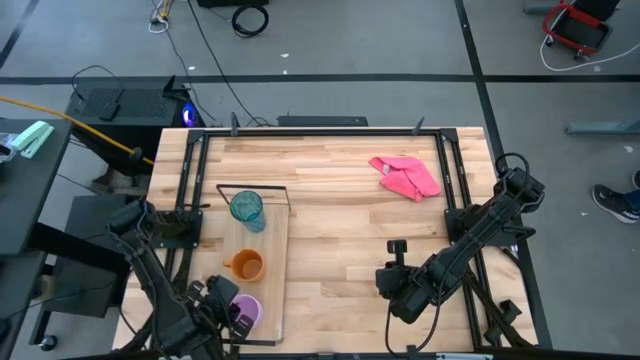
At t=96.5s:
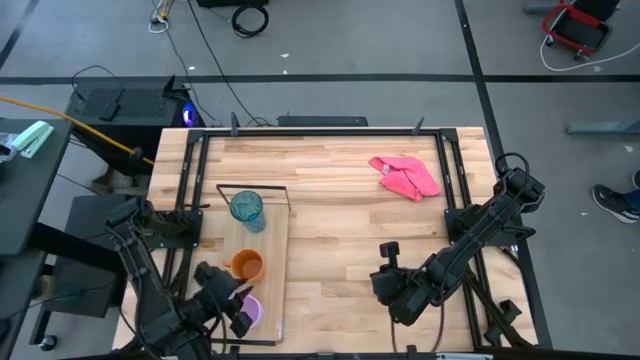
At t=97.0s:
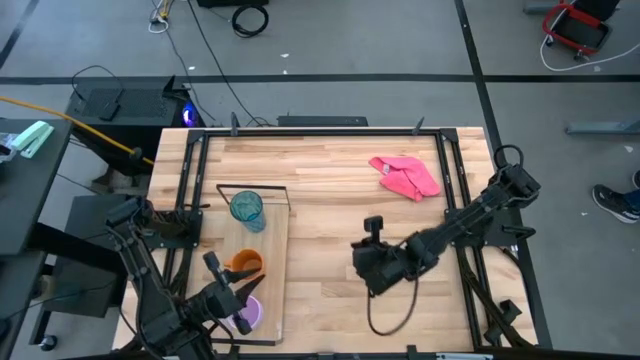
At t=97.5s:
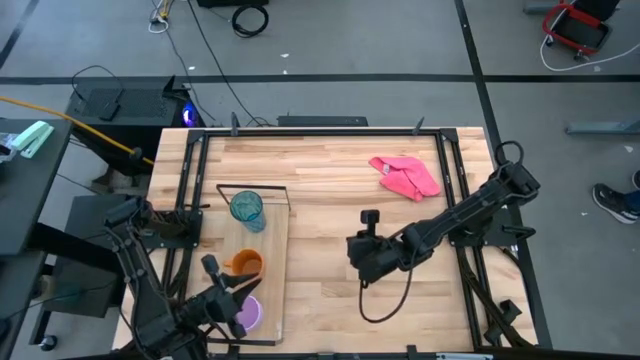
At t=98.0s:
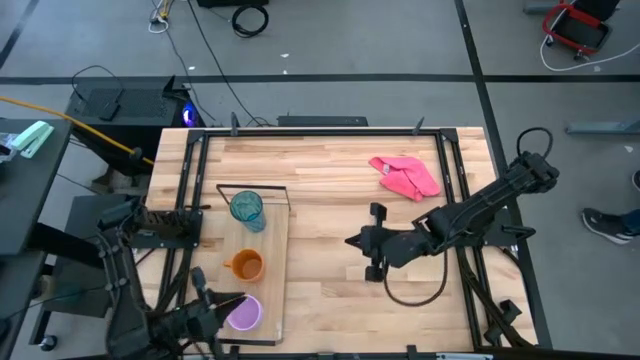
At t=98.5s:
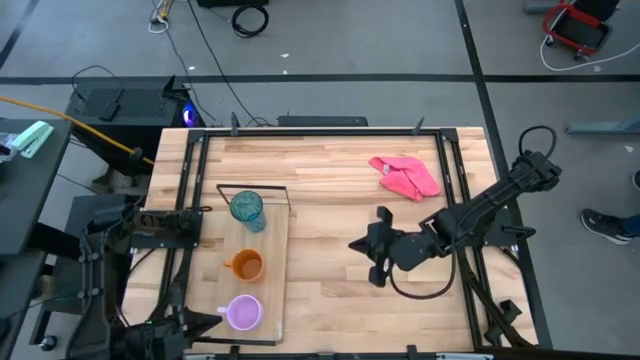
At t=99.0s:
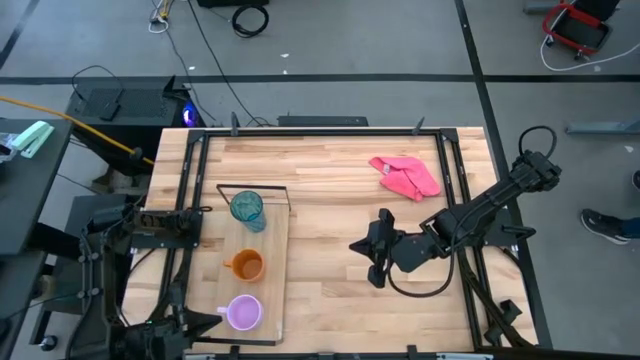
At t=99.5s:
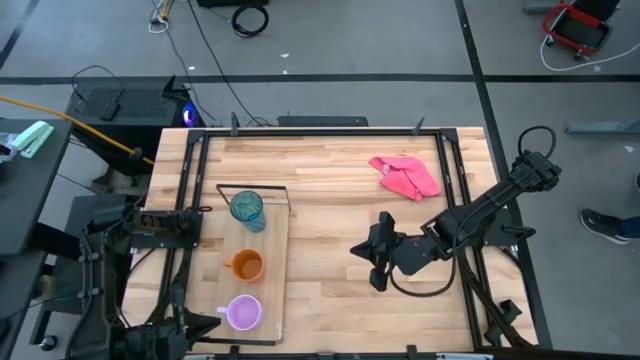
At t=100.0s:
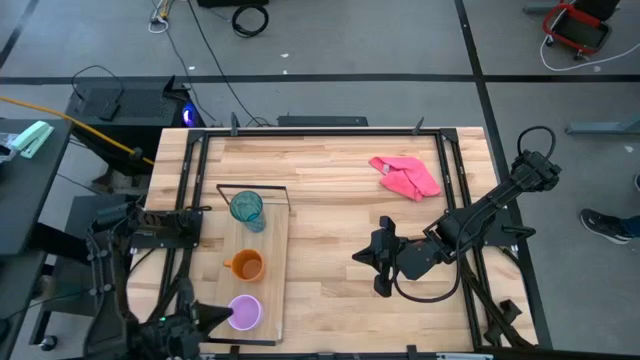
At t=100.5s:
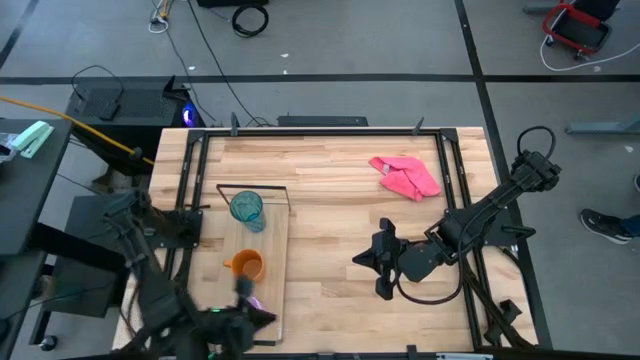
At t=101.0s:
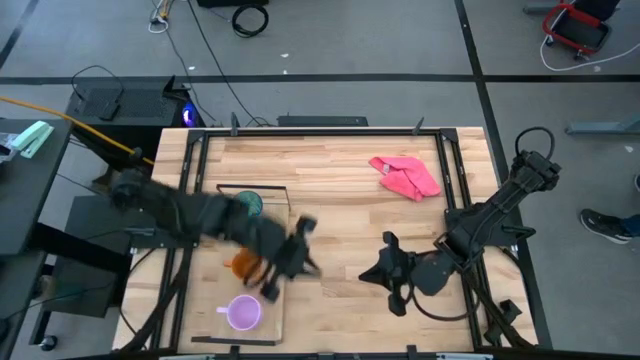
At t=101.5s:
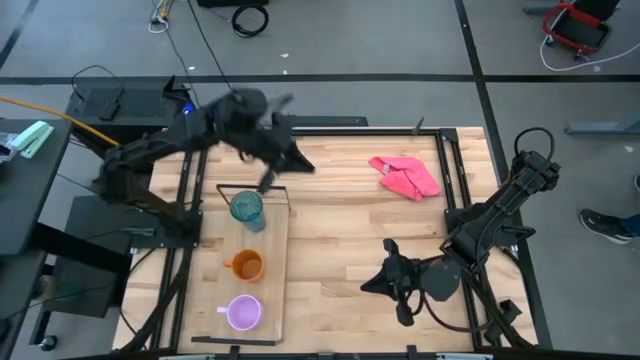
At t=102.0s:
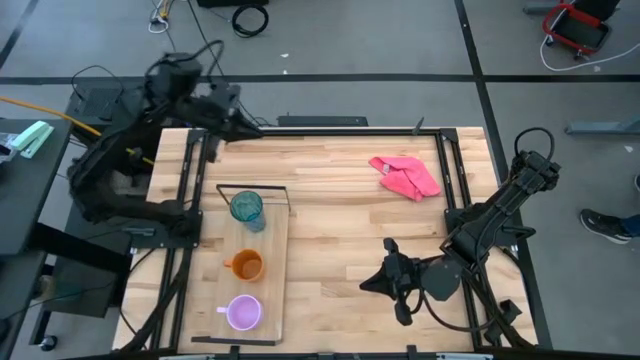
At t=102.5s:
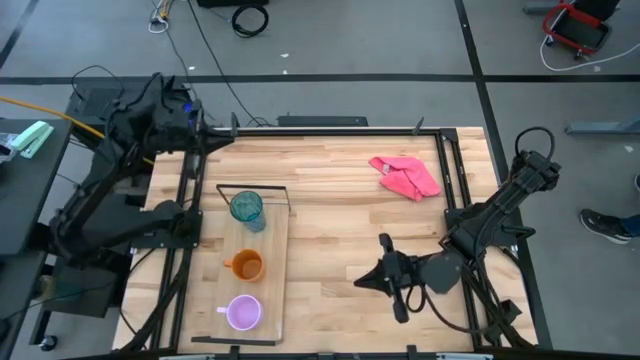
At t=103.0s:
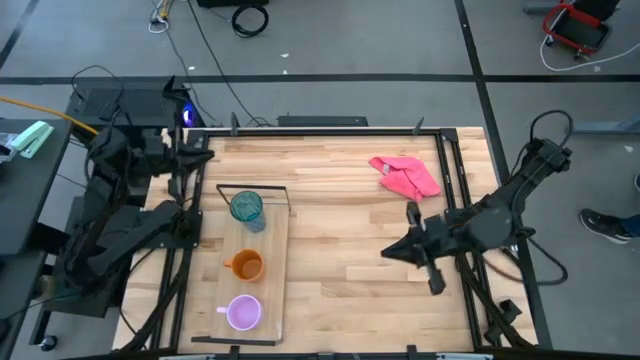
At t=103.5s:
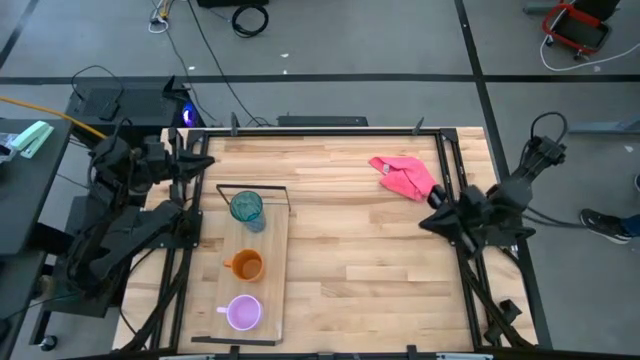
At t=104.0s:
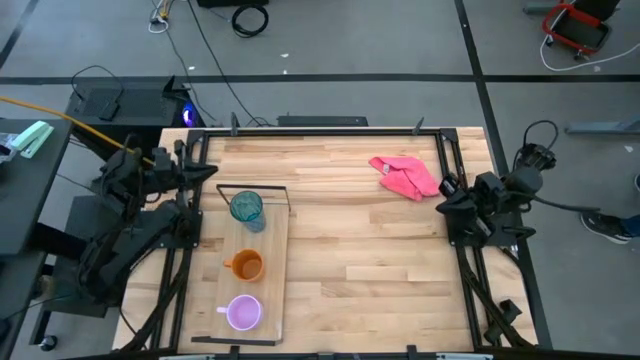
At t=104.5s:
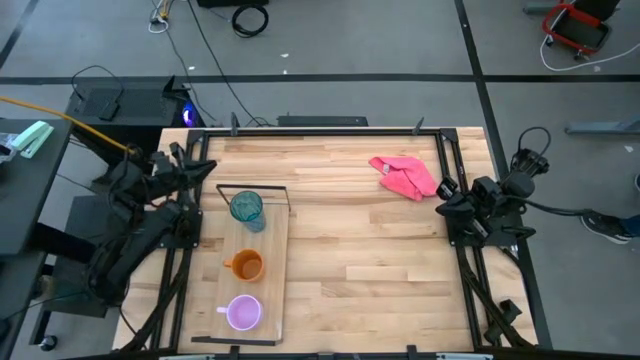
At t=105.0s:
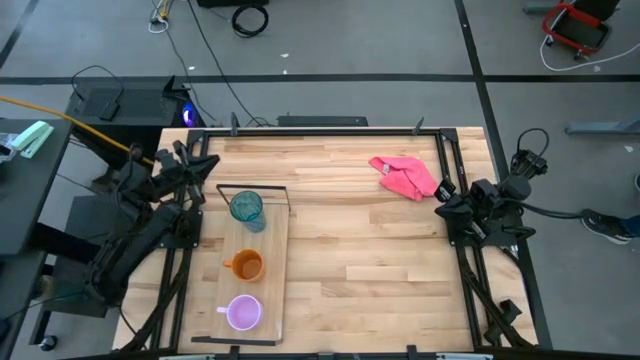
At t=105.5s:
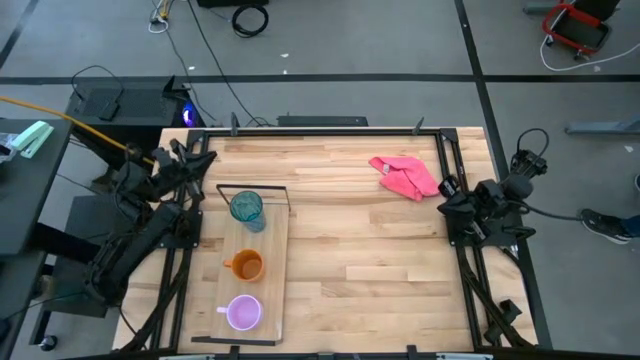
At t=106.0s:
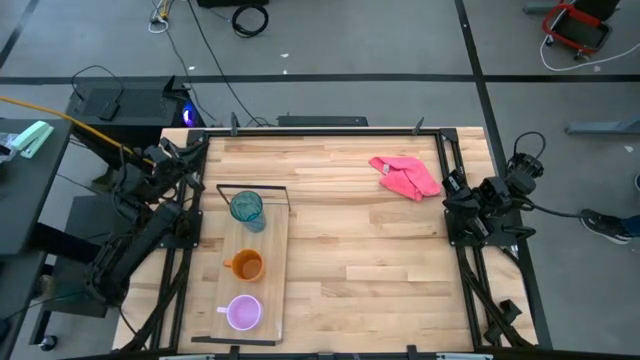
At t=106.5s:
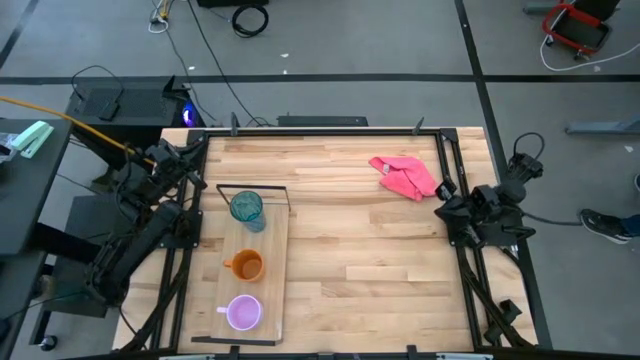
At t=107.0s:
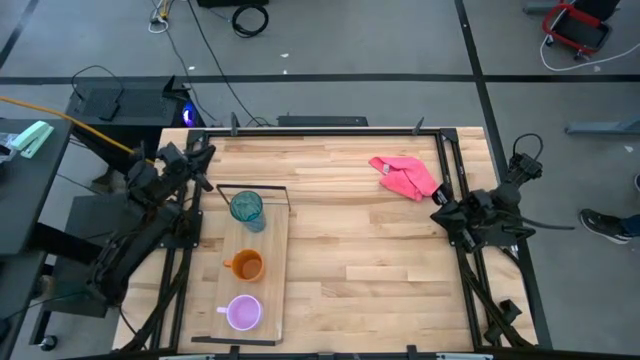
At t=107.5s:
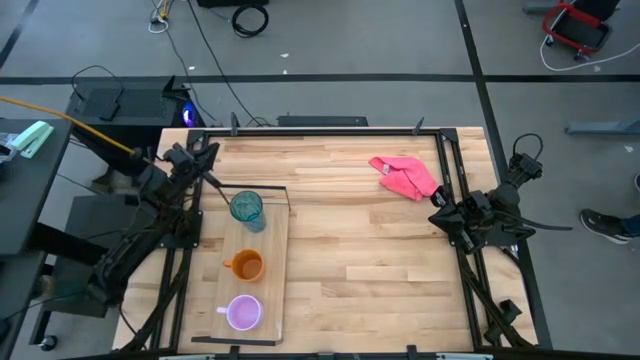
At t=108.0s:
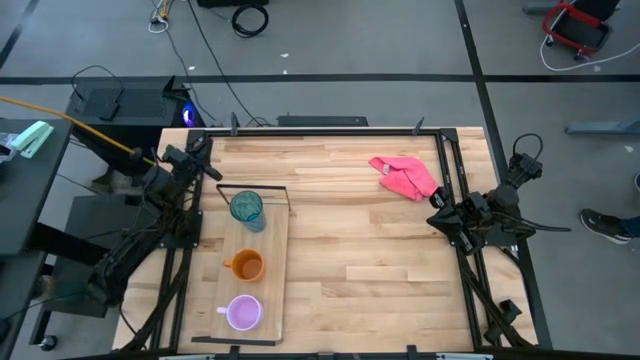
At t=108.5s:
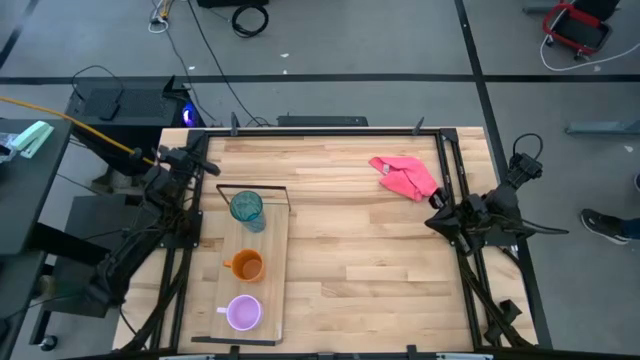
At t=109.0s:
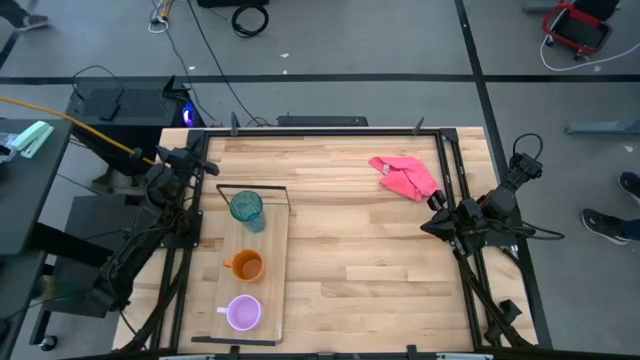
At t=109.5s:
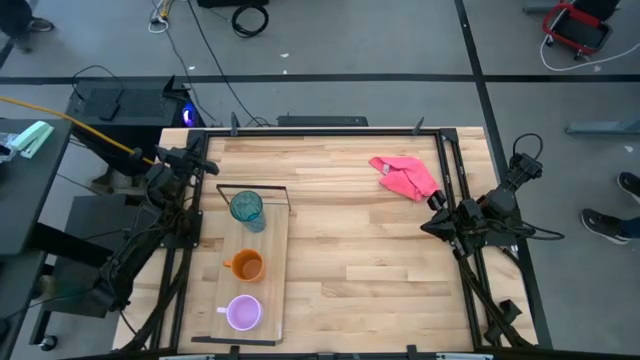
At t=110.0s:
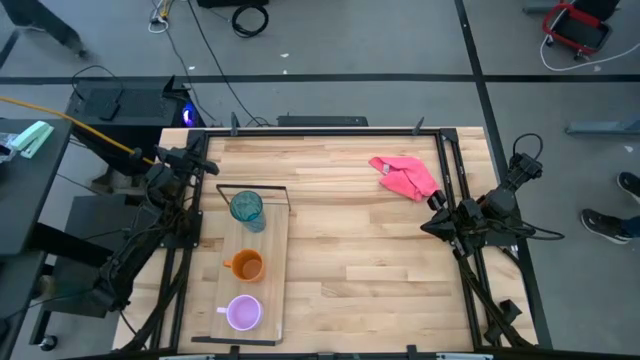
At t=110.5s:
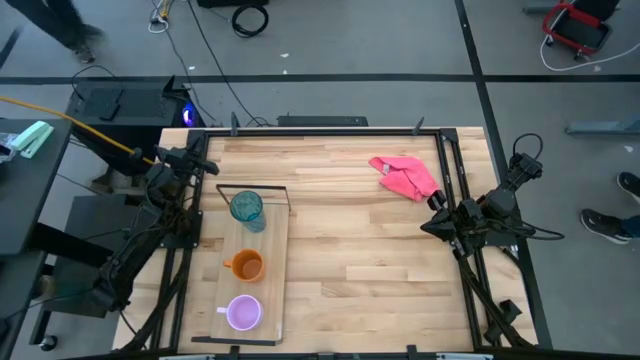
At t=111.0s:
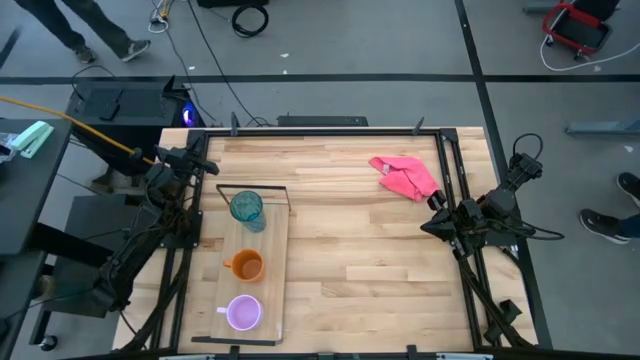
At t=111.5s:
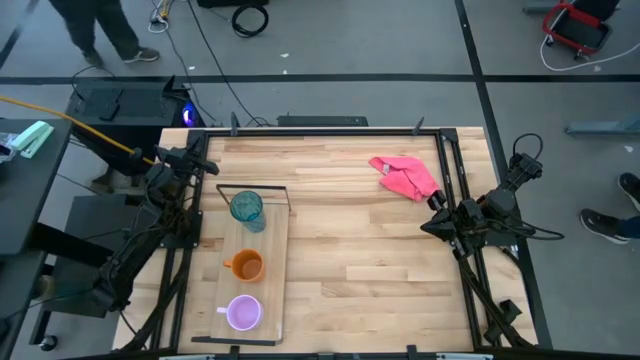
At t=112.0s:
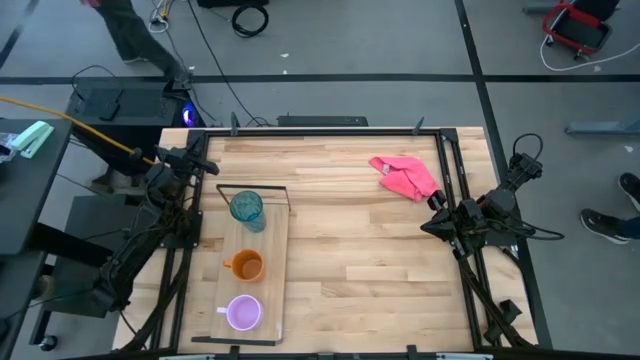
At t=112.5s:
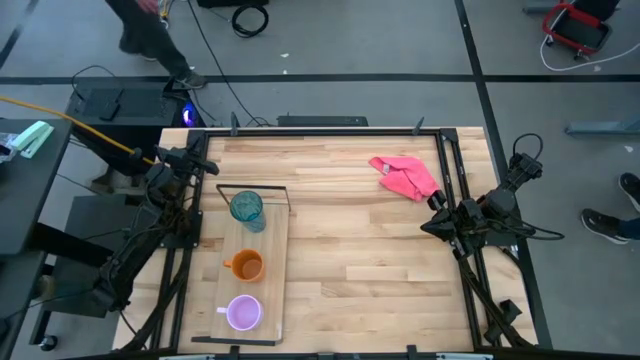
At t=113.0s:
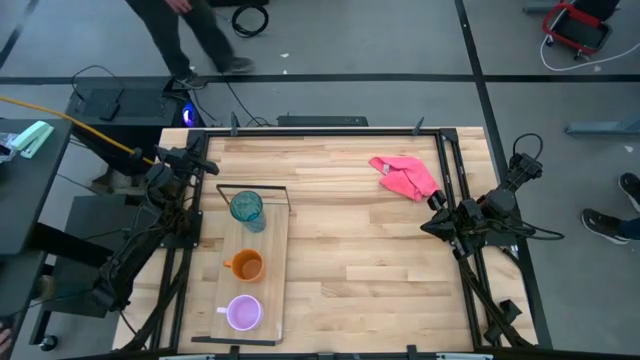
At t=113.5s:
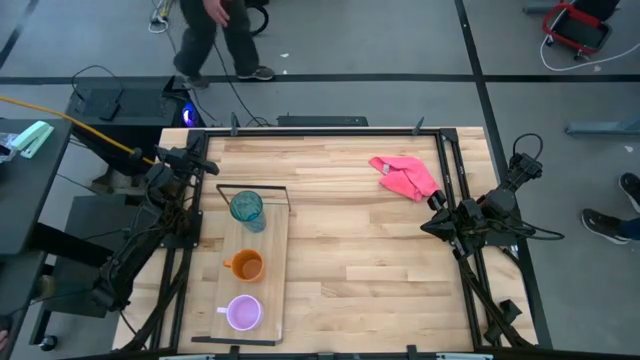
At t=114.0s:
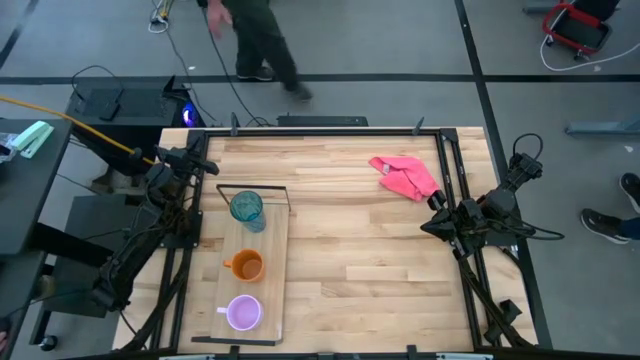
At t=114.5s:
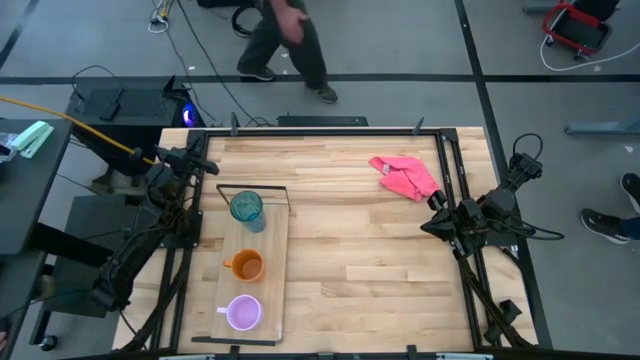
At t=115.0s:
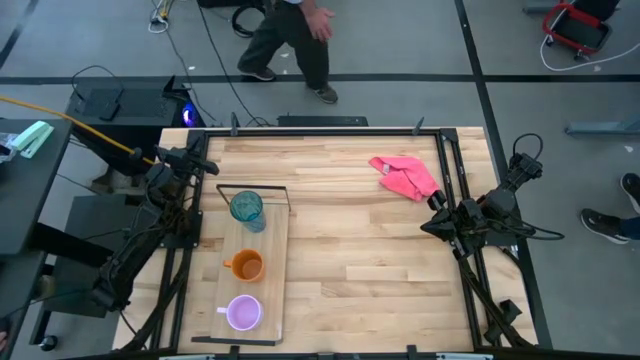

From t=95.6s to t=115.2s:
Task: Stack small to large cups/mugs on shelf
Return to Home Position

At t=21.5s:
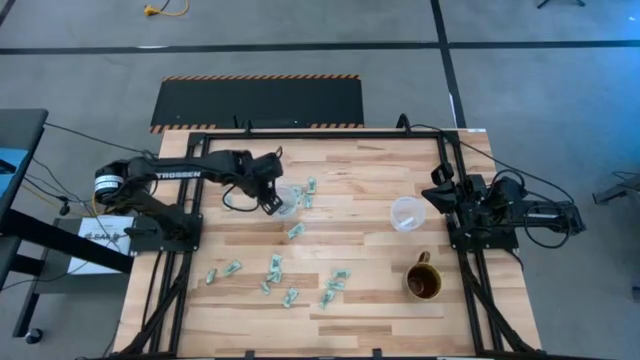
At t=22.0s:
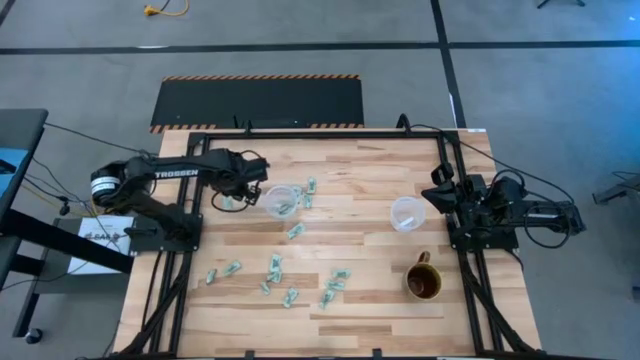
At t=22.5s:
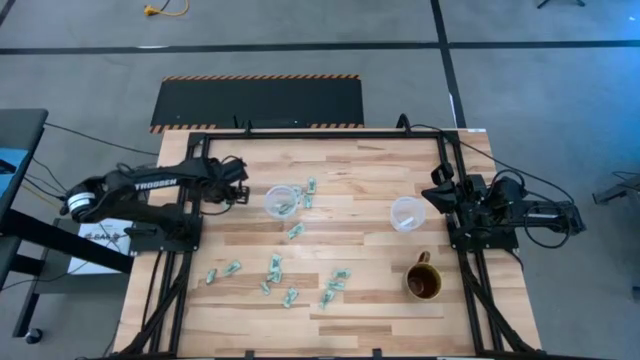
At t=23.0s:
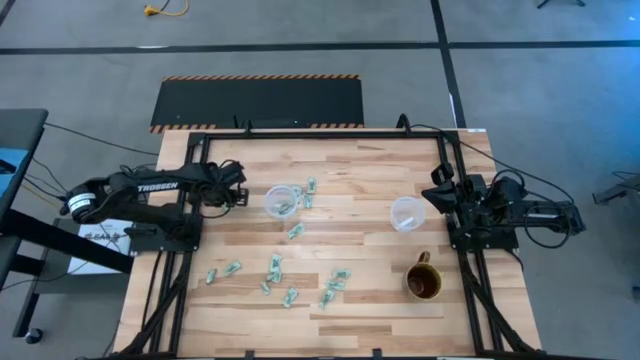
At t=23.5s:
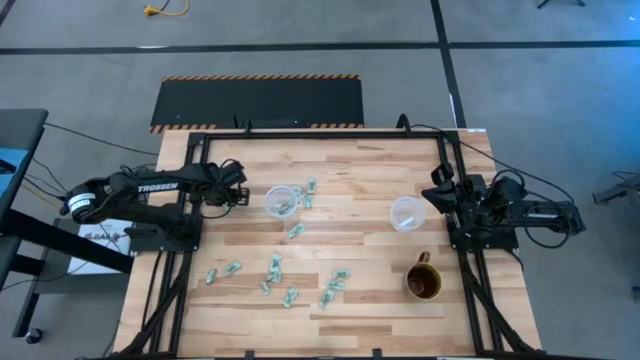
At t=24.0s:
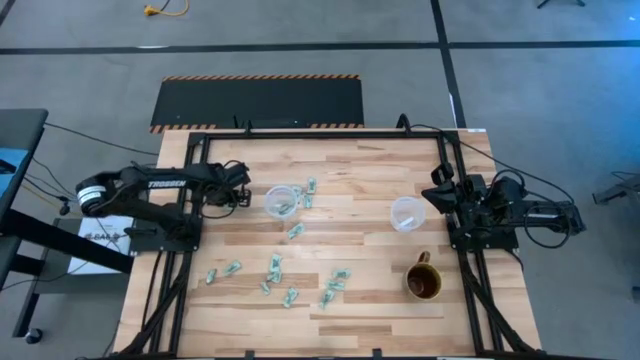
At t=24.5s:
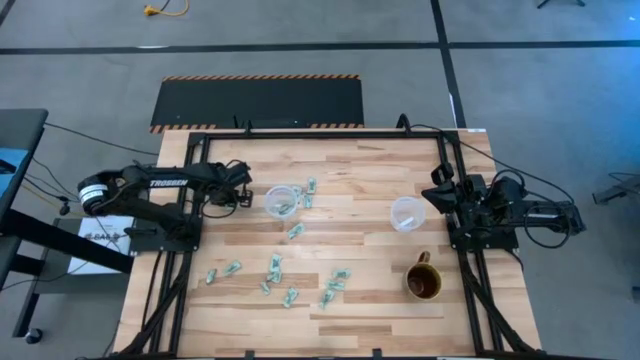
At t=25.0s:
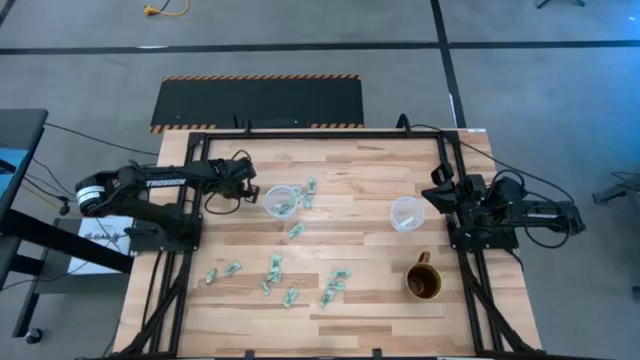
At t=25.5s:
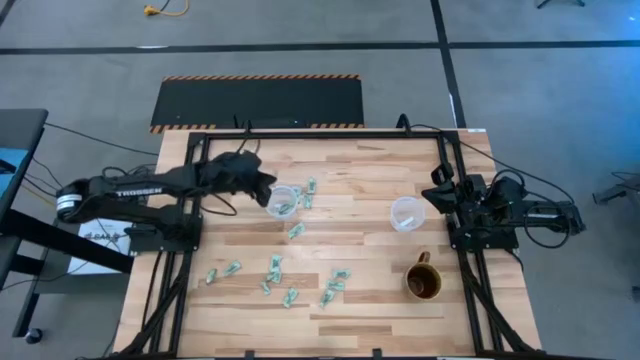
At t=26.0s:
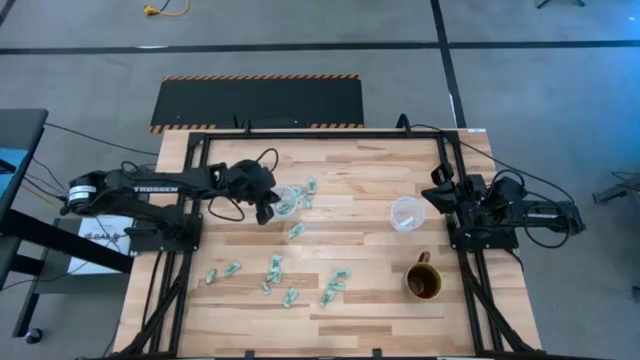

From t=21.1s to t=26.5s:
Task: Pick and place Stevia / Truvia into bins
Put the white stevia packet into the left transparent container
